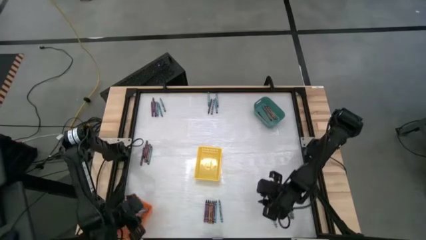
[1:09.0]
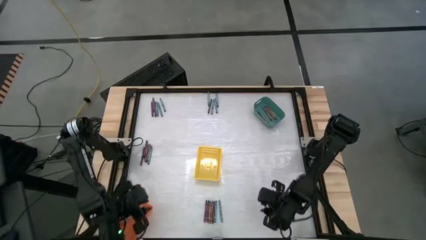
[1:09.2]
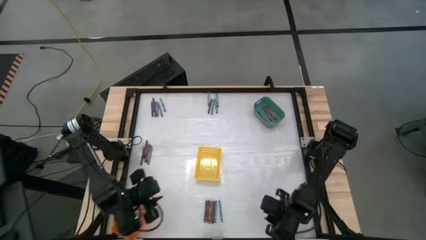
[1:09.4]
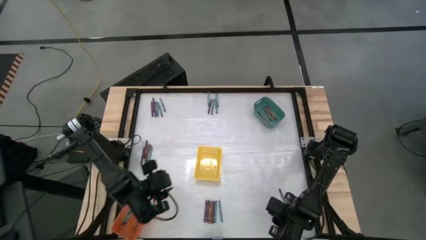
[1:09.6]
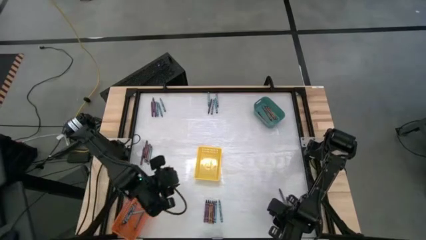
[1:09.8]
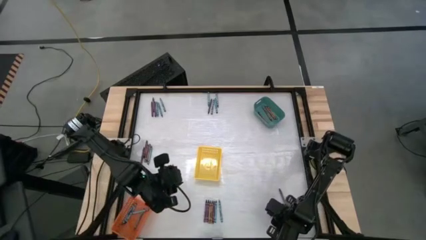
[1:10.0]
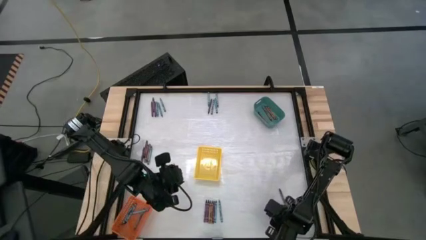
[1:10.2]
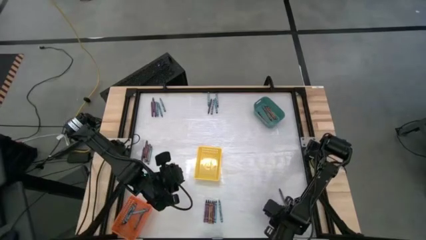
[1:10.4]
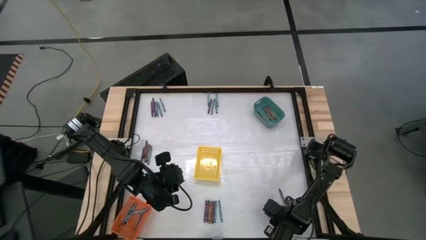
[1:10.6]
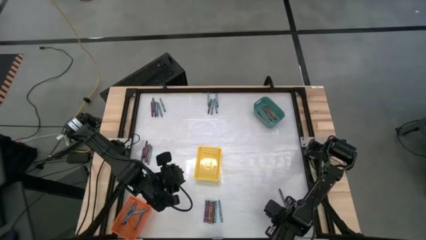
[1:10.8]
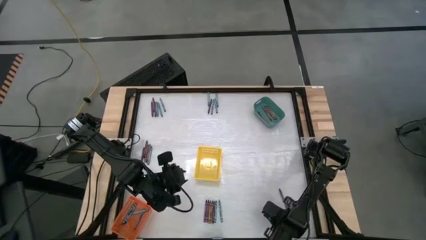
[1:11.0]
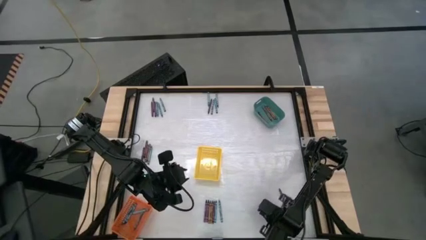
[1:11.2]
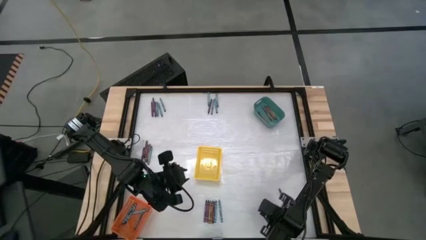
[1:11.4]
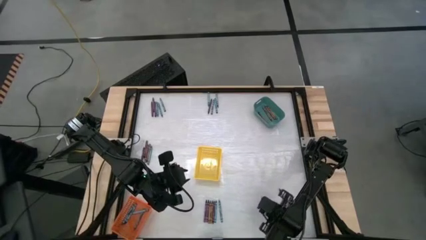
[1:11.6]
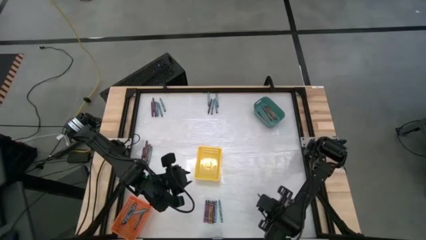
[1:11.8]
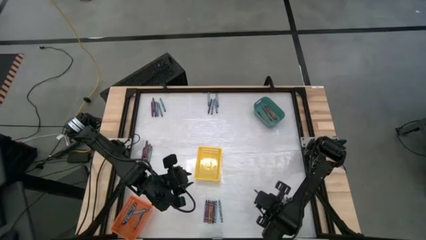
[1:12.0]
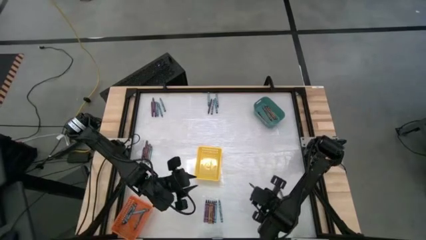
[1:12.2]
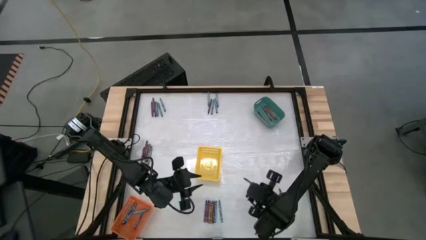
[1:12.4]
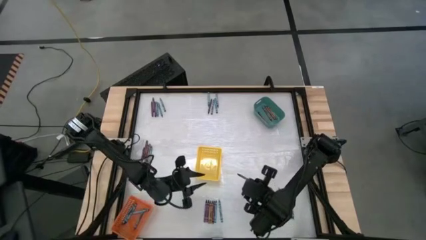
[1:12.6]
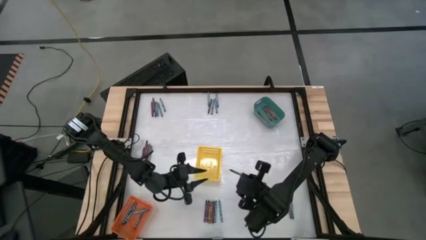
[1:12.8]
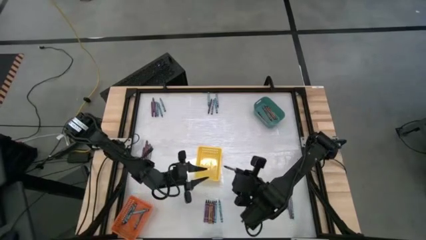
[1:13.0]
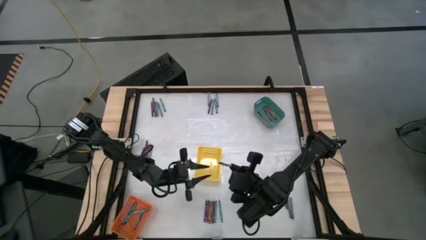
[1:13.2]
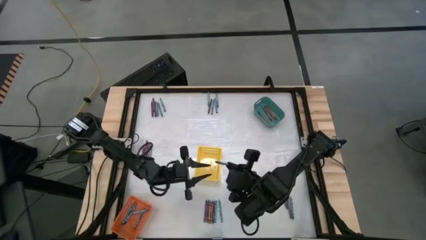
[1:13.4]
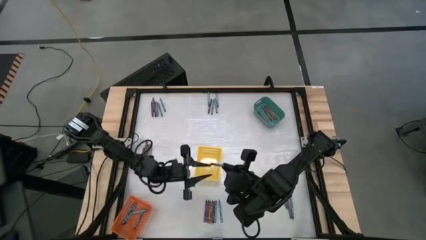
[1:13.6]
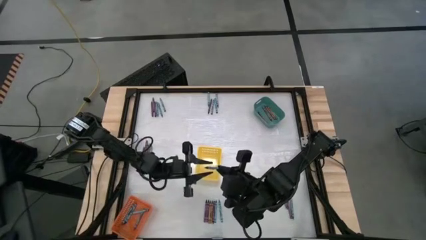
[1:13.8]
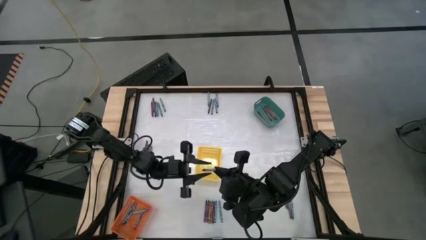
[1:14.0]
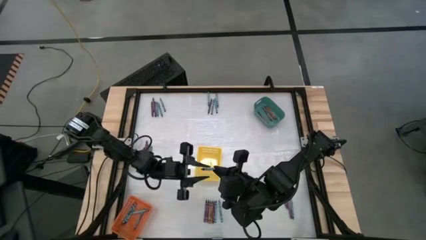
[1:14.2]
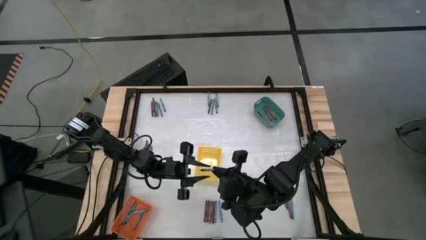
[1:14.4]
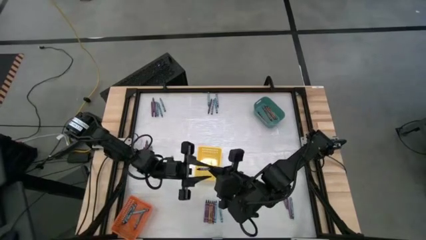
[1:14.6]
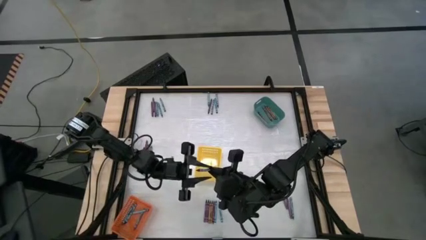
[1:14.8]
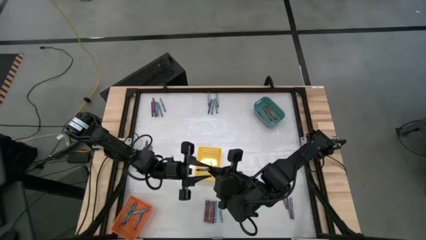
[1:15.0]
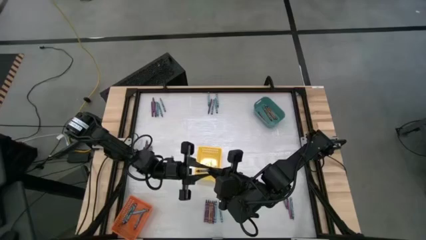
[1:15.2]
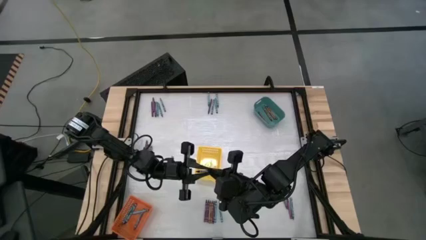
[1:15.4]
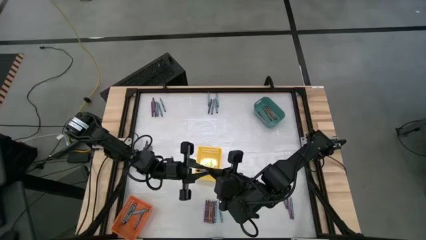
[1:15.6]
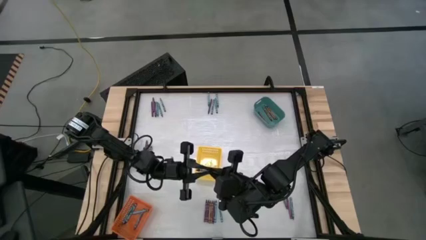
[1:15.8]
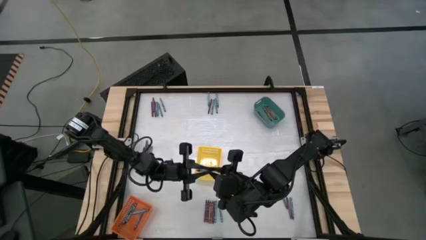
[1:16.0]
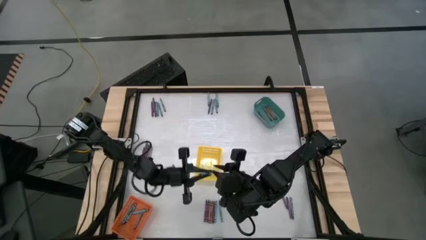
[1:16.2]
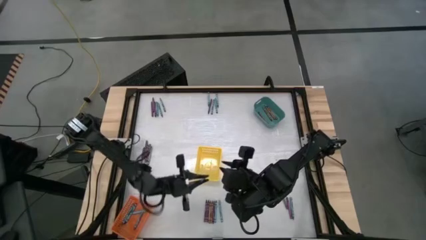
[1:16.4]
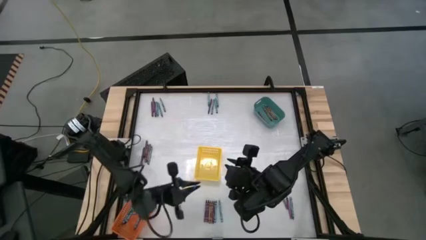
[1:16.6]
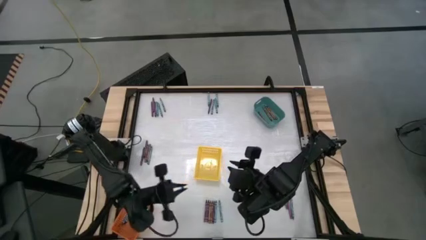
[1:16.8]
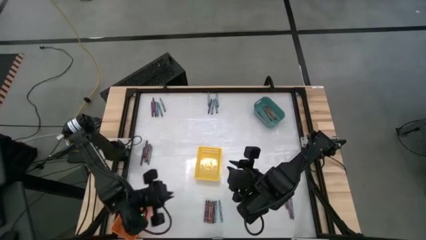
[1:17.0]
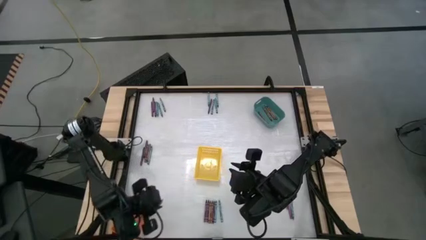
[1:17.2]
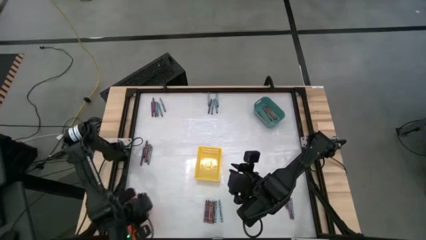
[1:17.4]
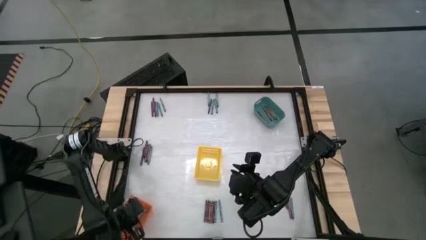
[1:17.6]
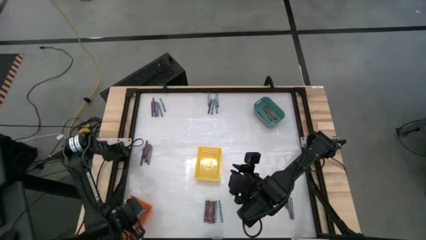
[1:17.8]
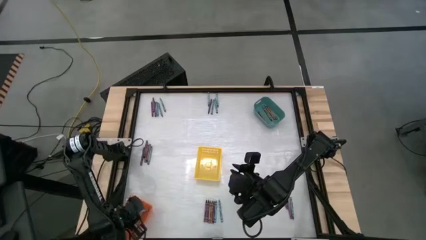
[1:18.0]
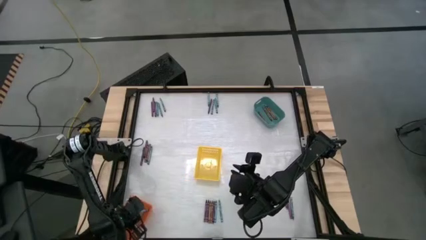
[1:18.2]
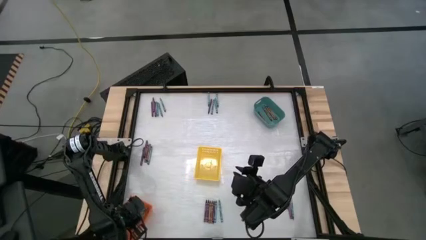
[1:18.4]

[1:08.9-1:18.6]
Task: Sort crayons
Put the dark blue crayon into the orange basket

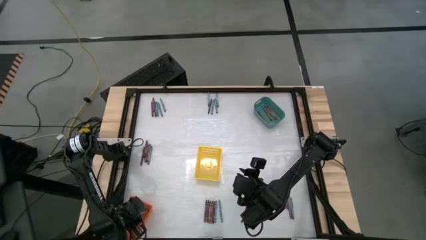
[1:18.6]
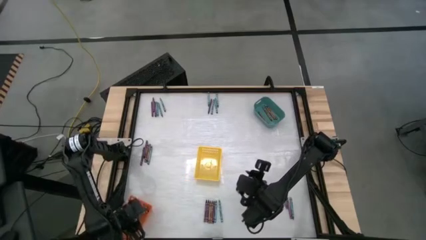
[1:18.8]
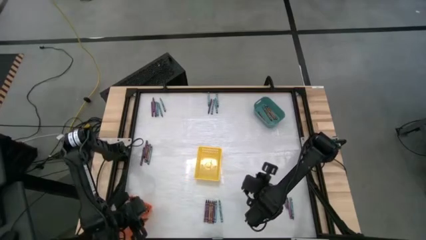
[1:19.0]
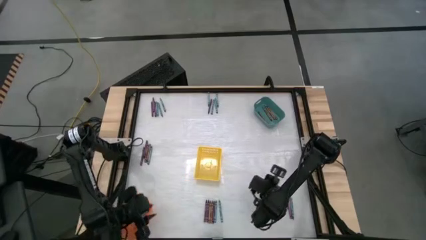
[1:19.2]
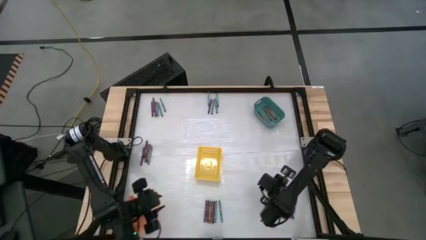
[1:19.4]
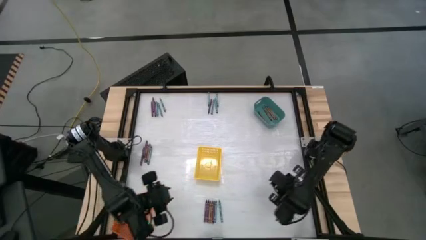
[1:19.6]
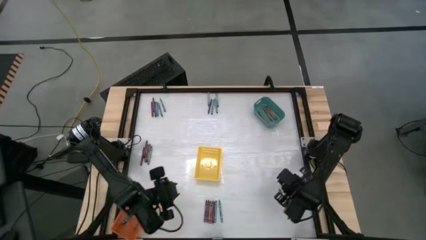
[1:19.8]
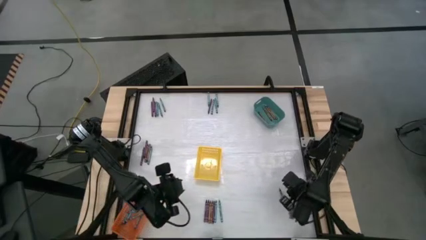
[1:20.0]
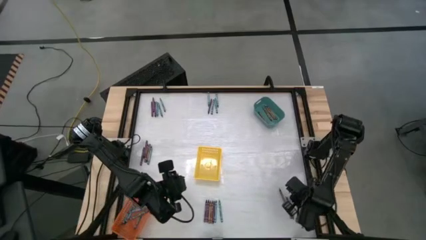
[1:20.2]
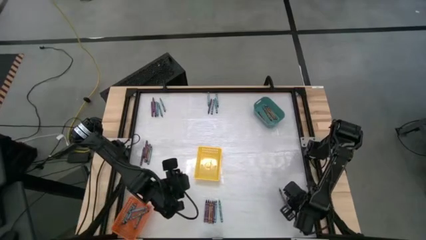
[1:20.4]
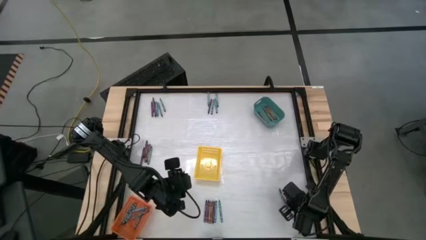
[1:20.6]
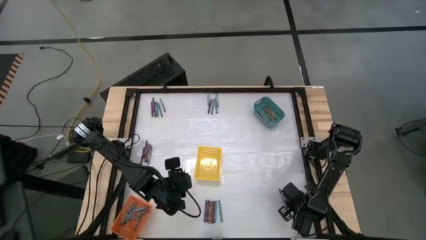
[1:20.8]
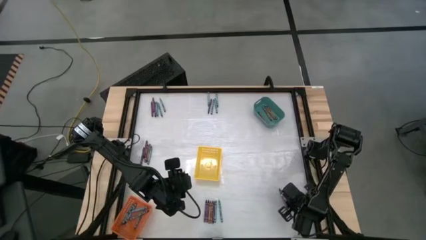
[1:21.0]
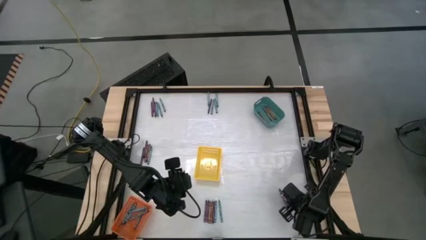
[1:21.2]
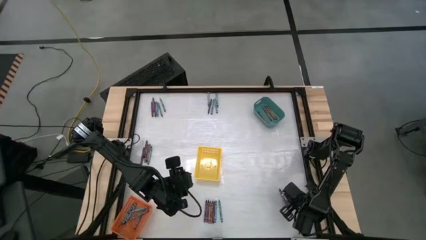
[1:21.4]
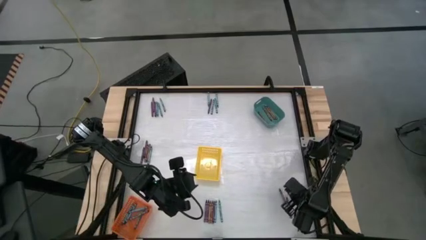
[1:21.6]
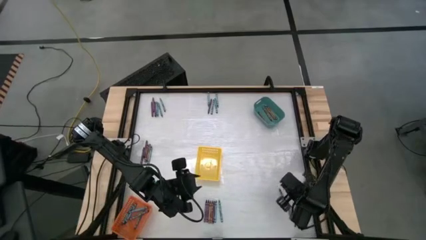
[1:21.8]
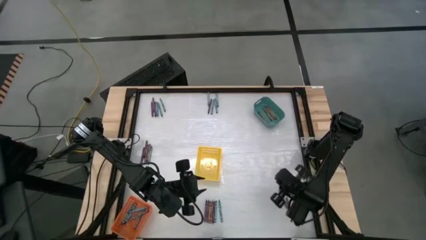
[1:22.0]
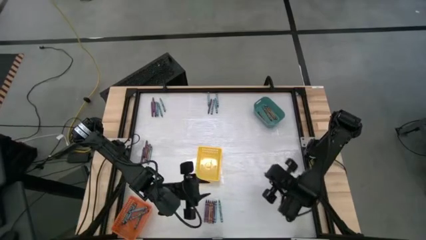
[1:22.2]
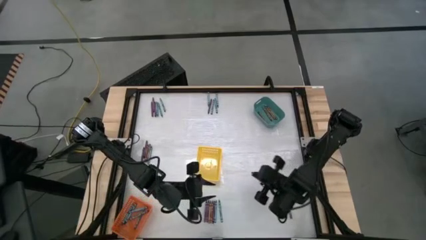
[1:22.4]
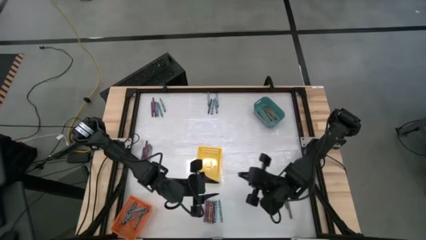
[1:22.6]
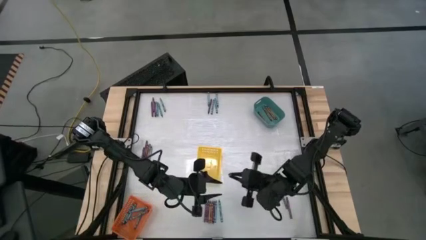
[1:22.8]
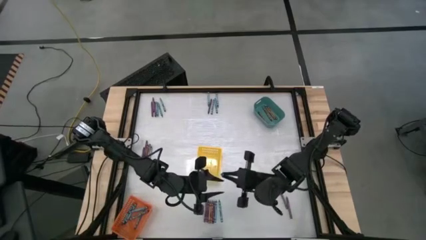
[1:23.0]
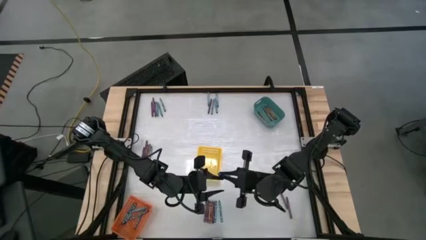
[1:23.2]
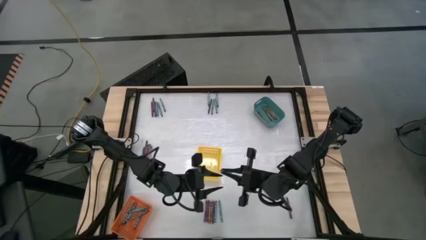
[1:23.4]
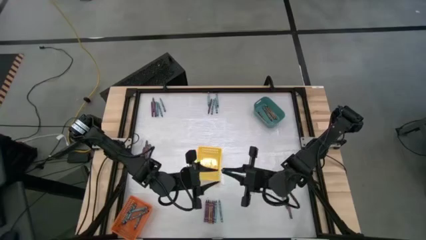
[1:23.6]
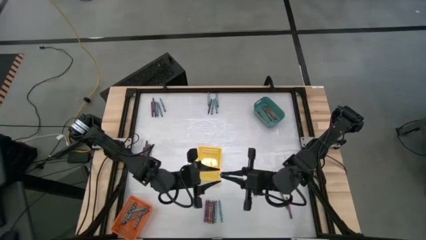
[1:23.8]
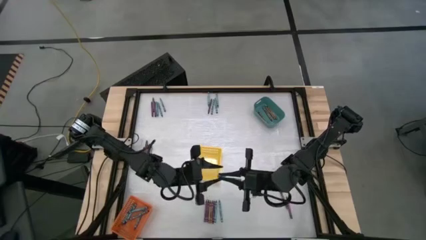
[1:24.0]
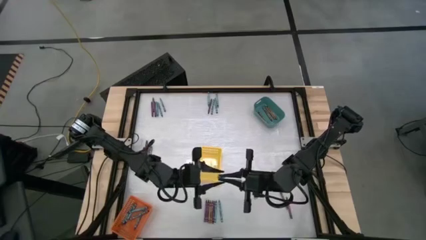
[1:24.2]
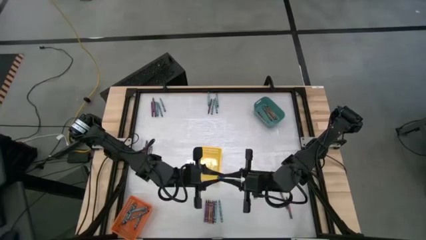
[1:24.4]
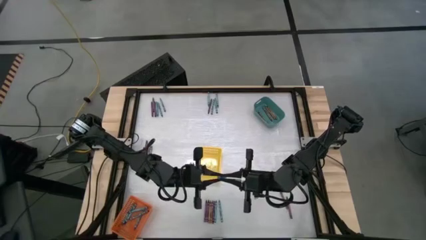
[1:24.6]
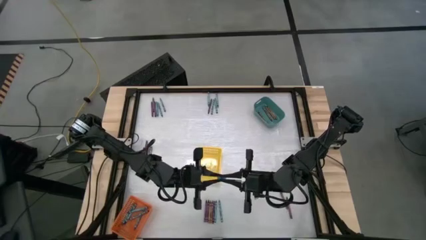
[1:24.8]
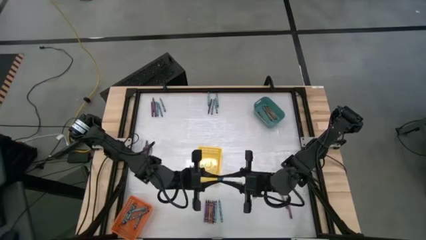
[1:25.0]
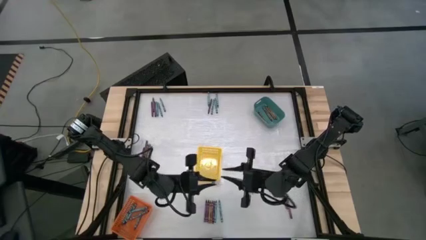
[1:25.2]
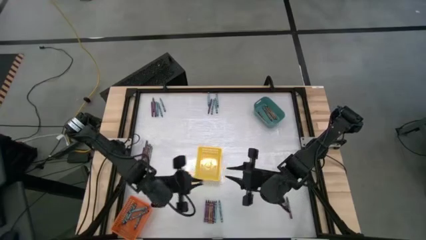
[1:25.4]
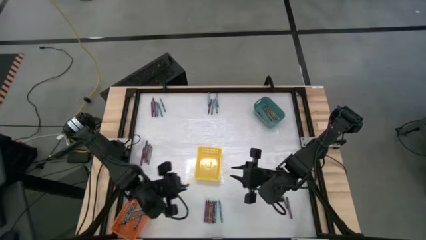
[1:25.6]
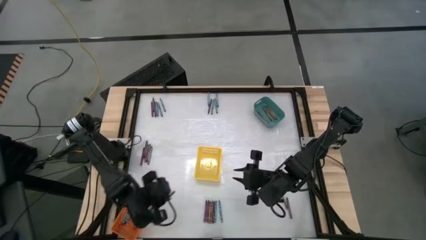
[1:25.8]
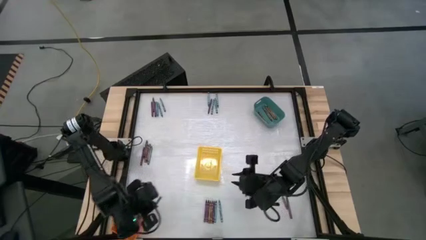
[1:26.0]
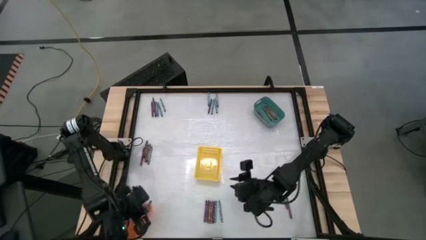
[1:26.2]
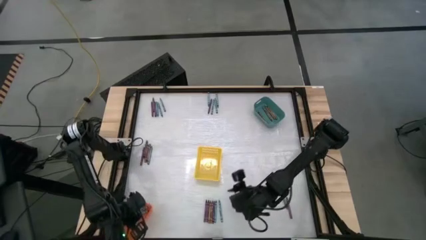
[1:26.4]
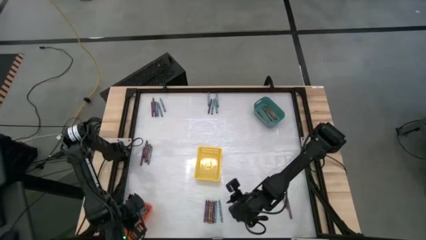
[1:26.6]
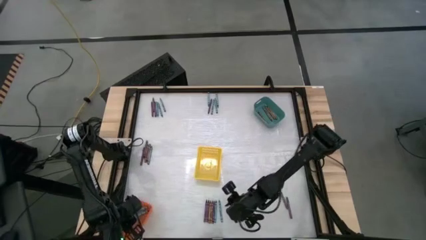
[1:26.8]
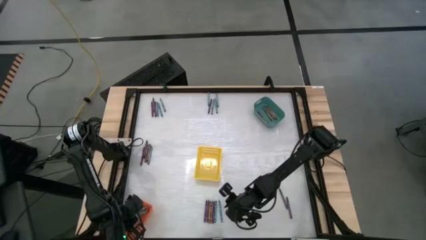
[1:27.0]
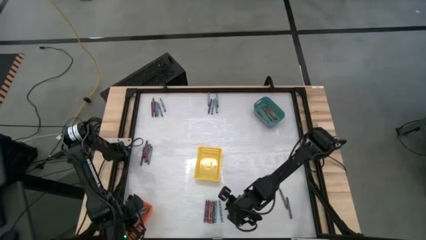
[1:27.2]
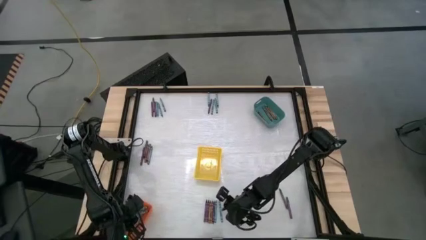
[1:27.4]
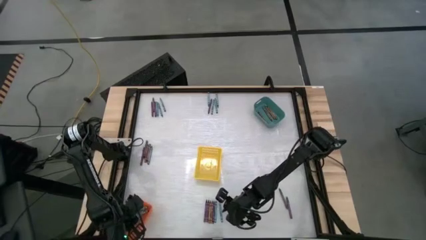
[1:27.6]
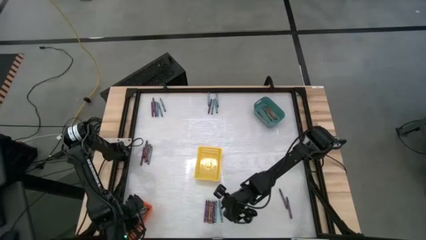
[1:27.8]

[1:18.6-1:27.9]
Put the light blue crayon into the orange basket
